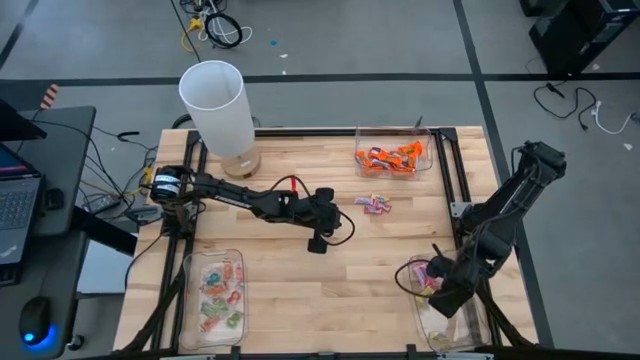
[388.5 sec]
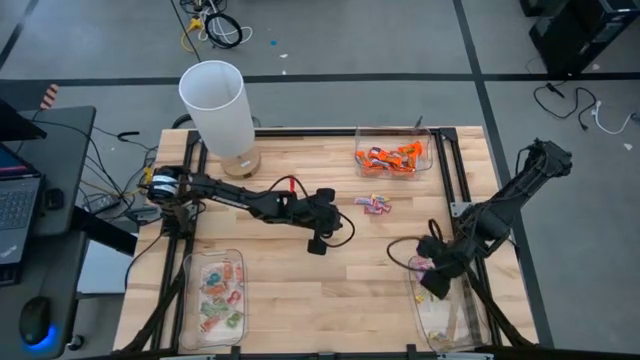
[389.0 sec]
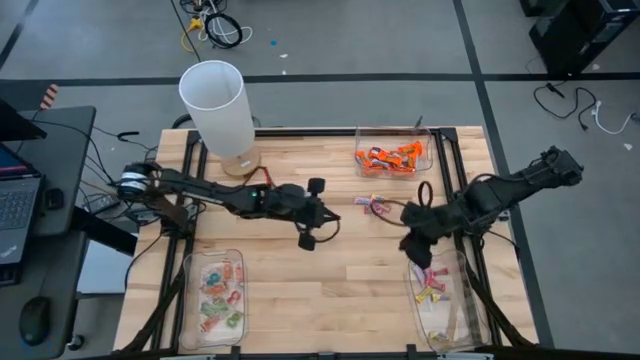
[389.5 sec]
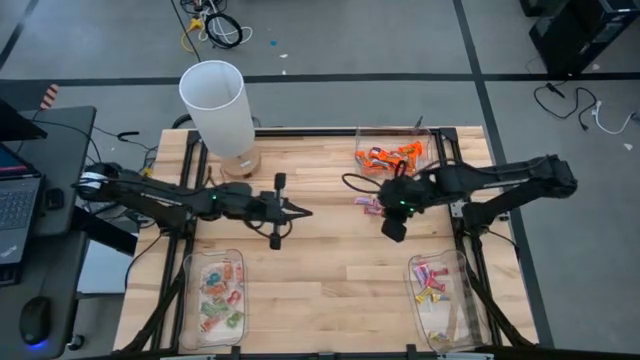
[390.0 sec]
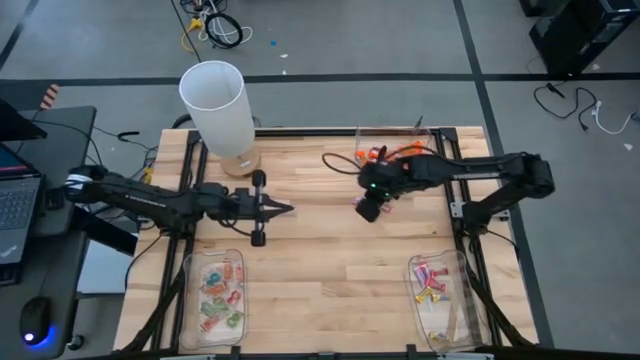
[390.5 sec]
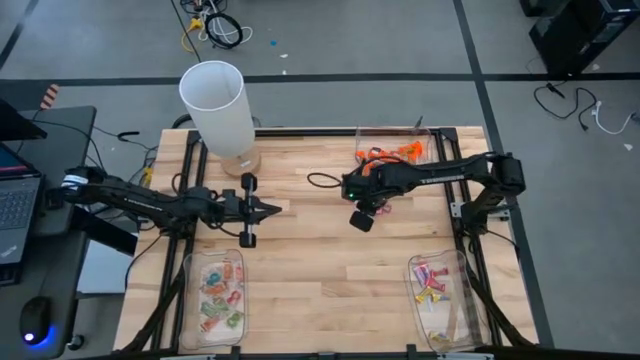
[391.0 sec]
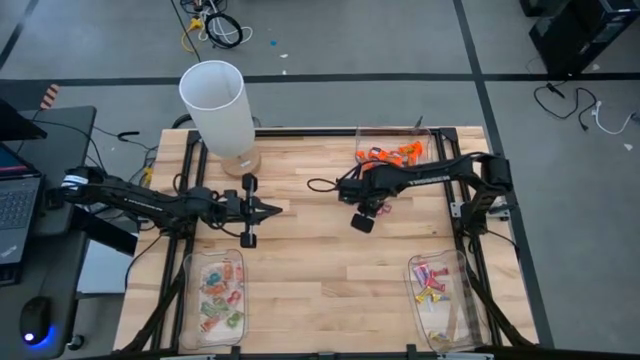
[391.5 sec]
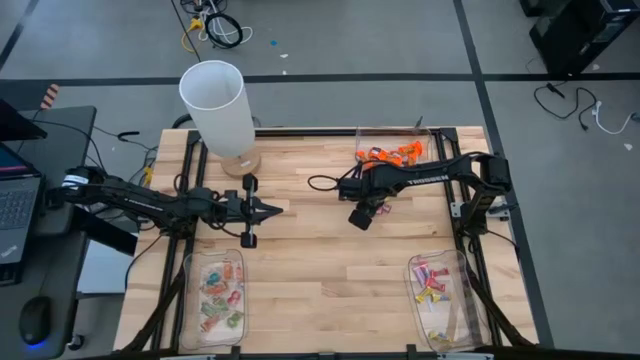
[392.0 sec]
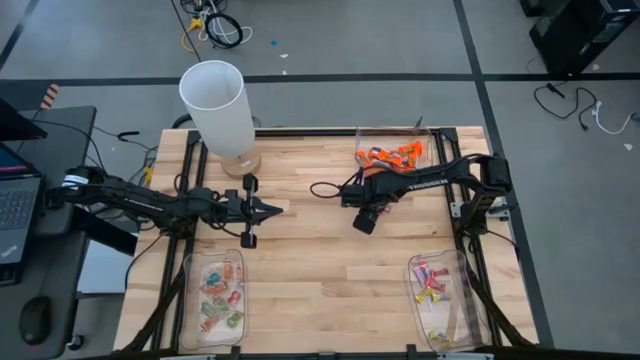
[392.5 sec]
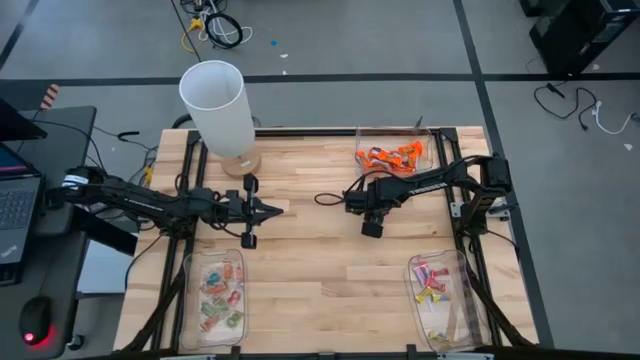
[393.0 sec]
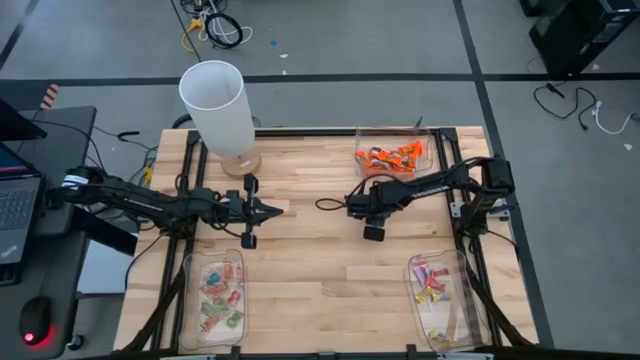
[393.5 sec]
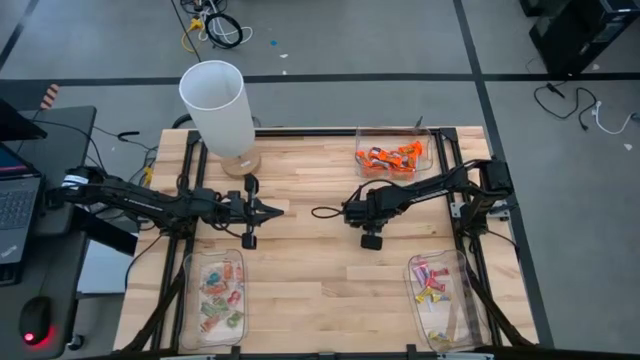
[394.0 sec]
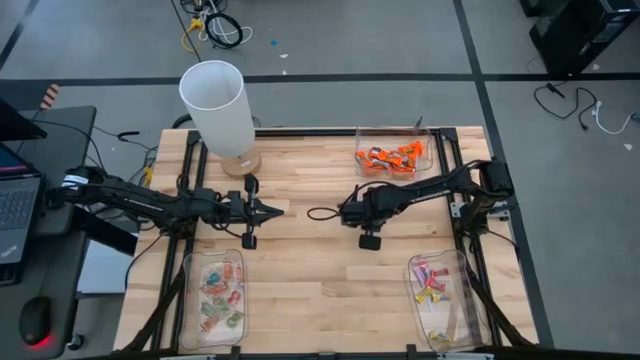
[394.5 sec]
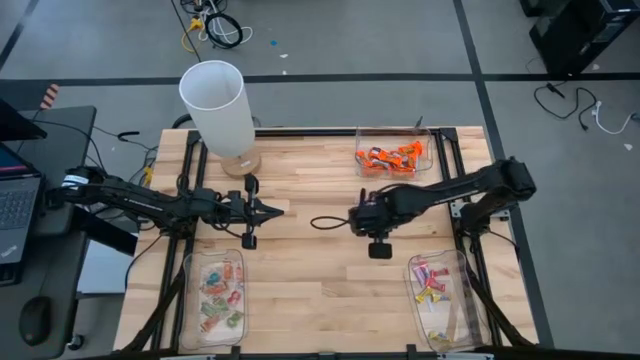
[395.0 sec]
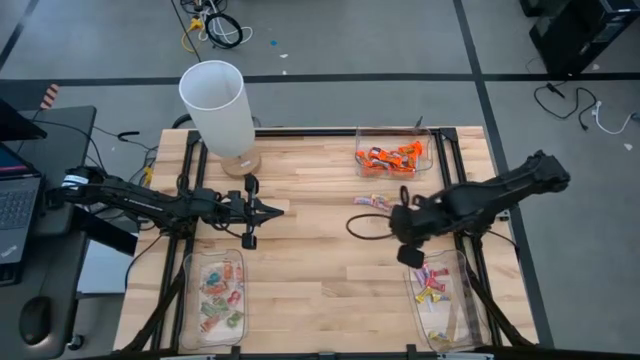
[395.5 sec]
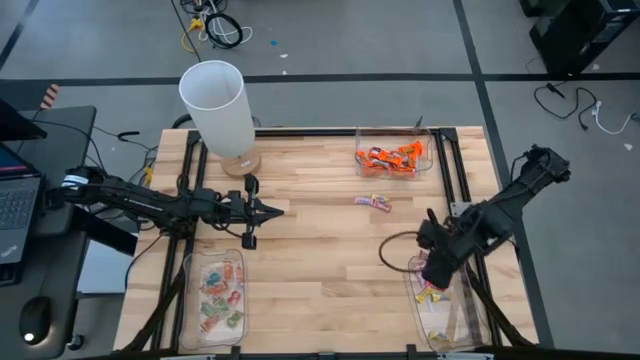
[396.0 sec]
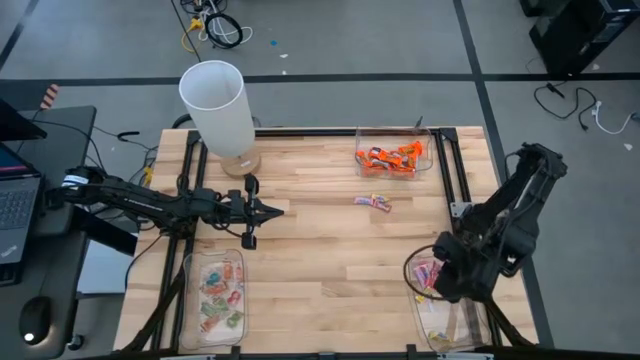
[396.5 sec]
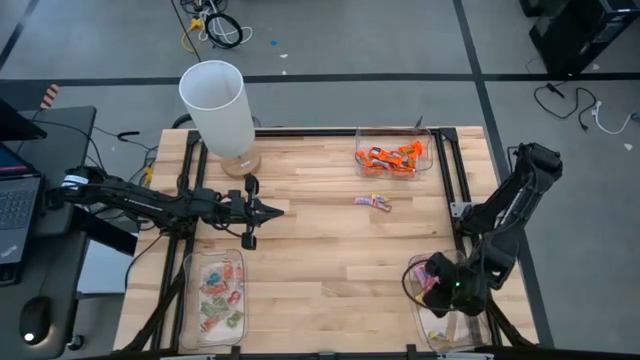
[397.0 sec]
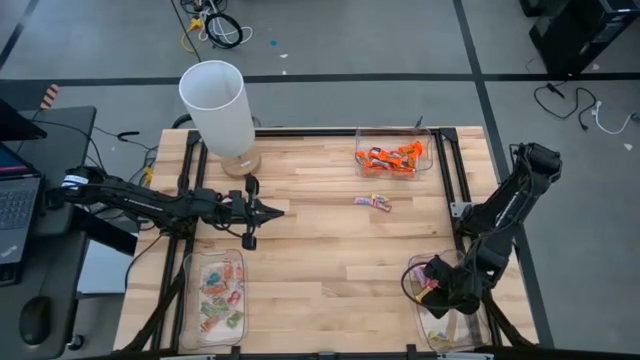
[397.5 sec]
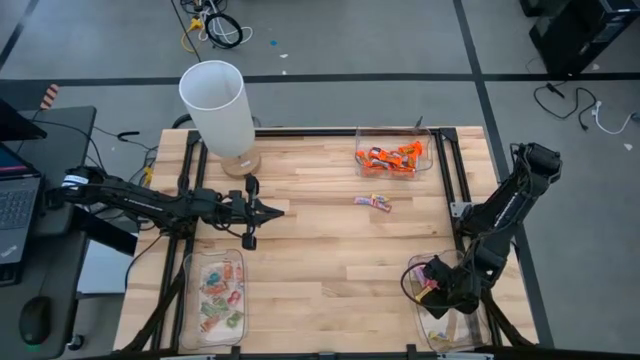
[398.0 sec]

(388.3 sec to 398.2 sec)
Task: Sort candy
Put the red candy into the bottom right transparent bin

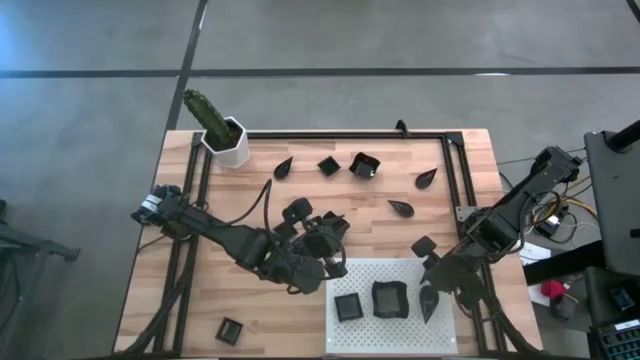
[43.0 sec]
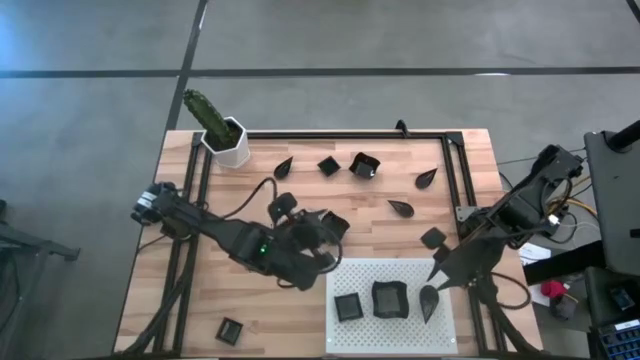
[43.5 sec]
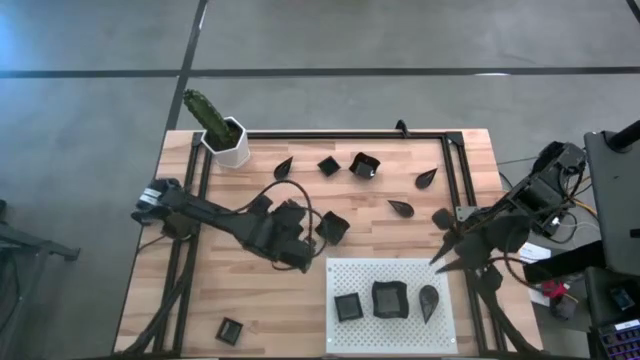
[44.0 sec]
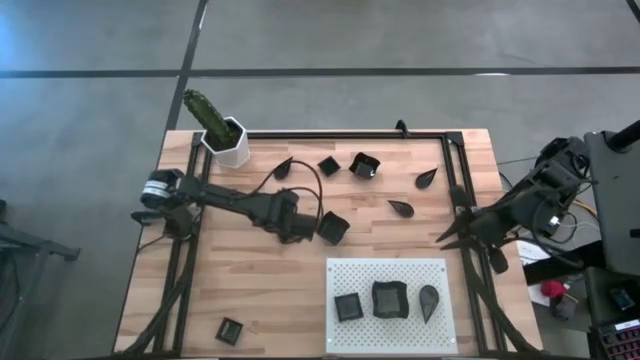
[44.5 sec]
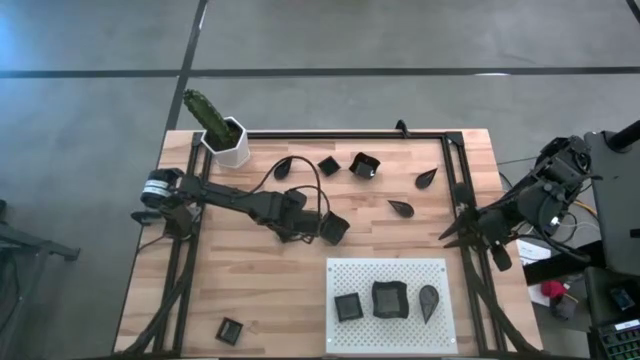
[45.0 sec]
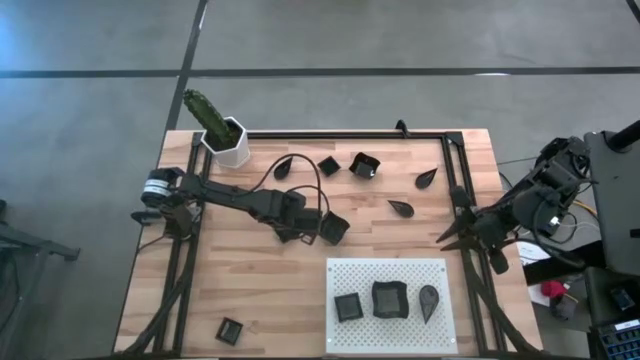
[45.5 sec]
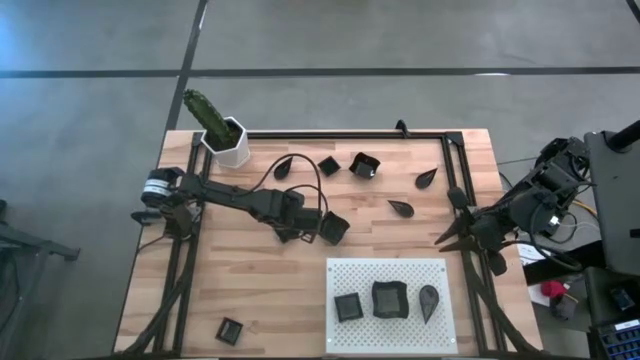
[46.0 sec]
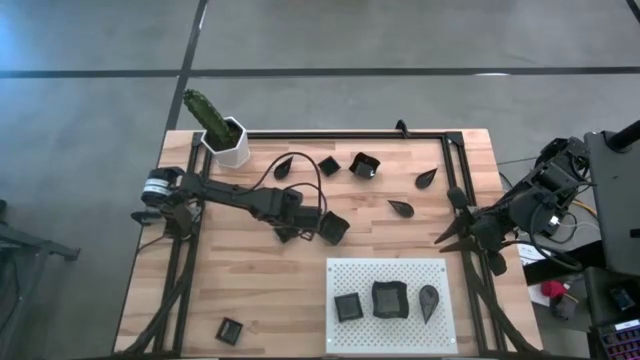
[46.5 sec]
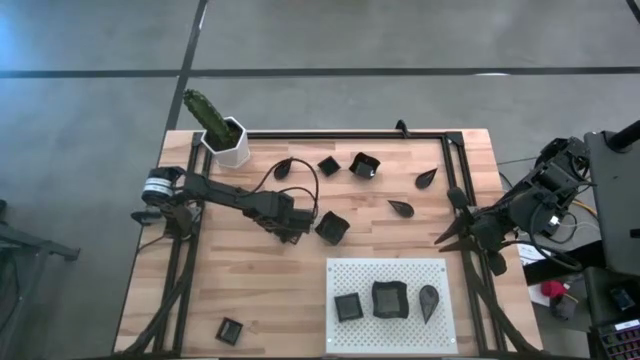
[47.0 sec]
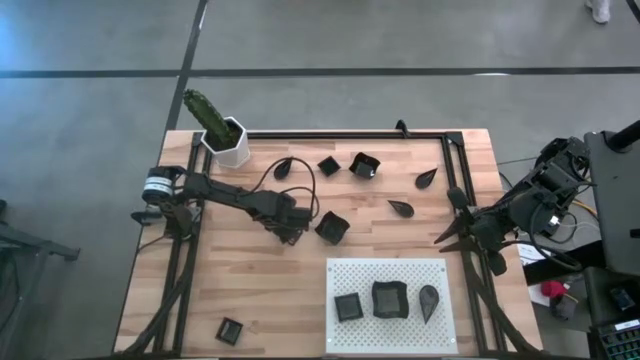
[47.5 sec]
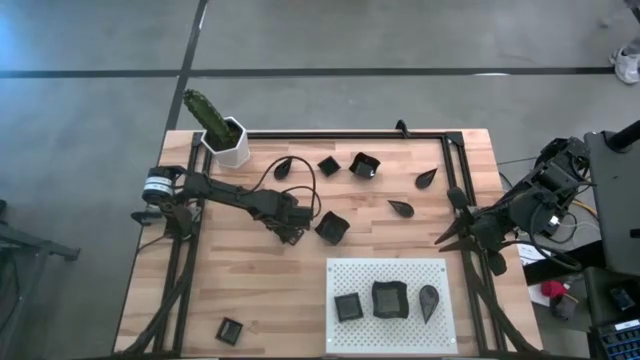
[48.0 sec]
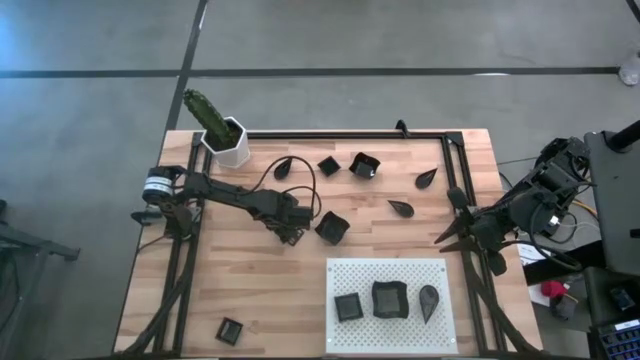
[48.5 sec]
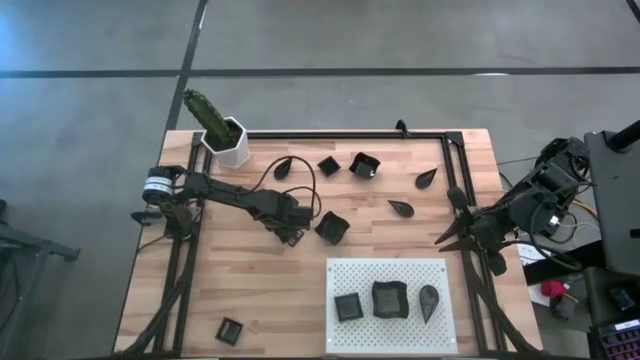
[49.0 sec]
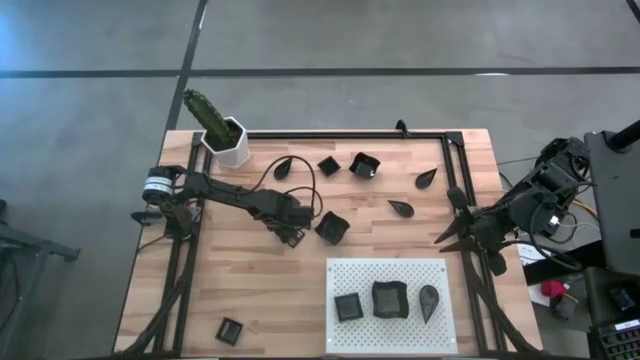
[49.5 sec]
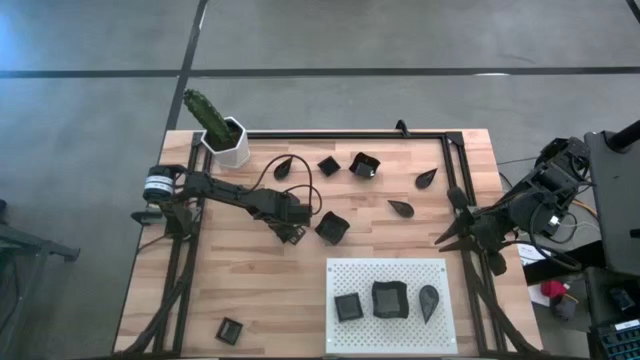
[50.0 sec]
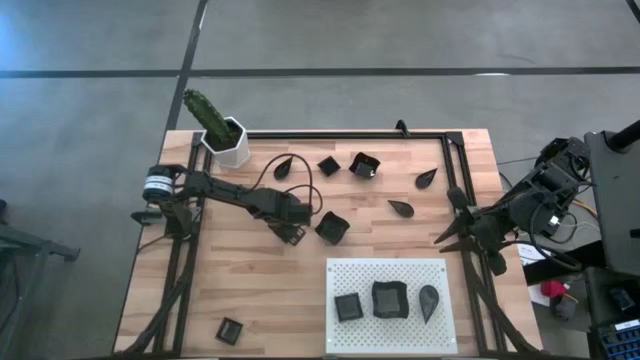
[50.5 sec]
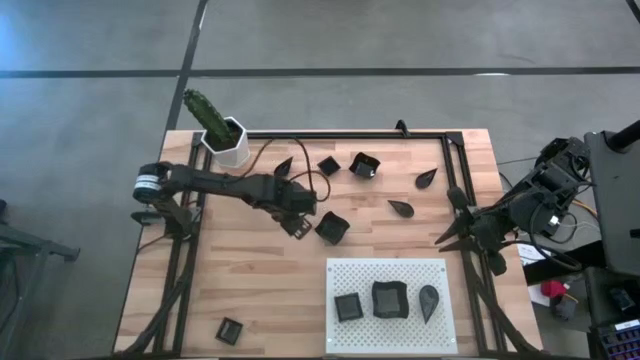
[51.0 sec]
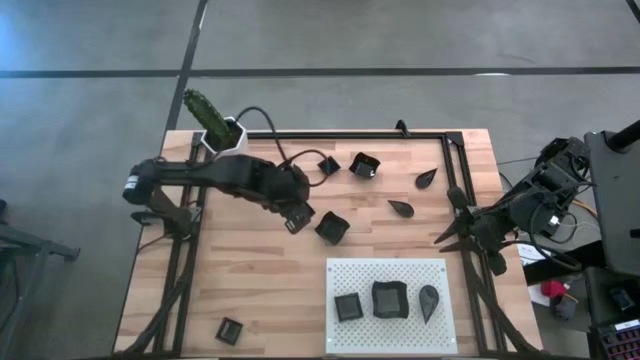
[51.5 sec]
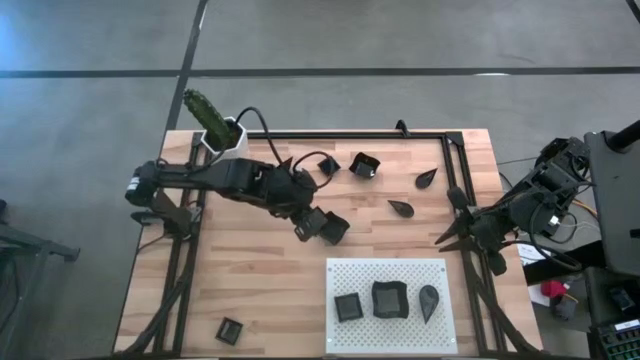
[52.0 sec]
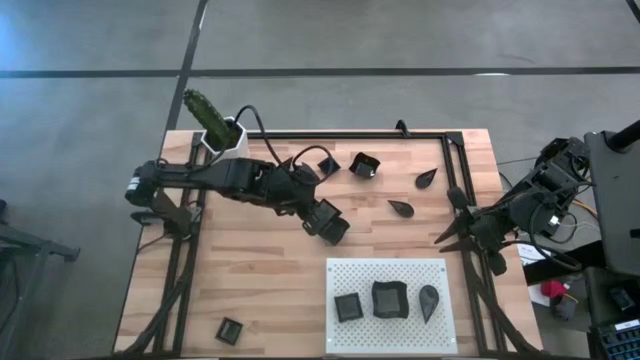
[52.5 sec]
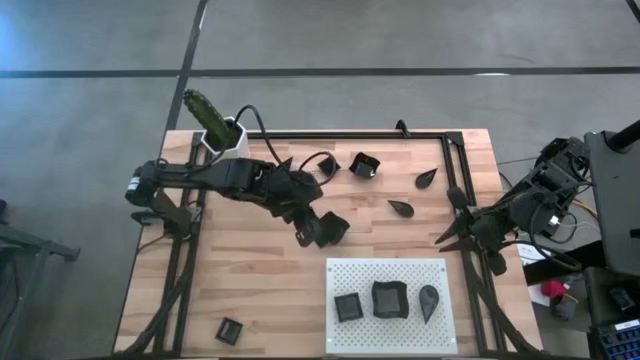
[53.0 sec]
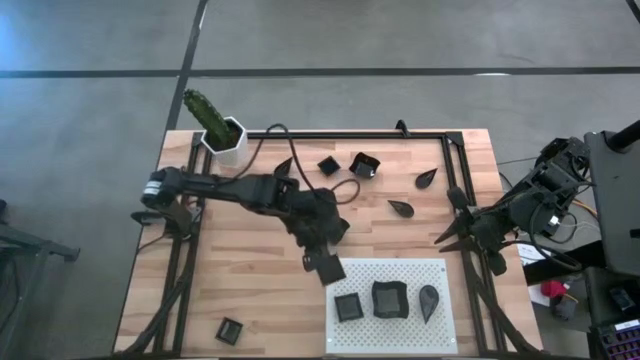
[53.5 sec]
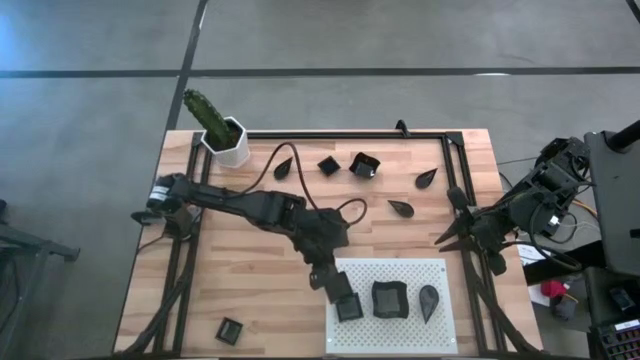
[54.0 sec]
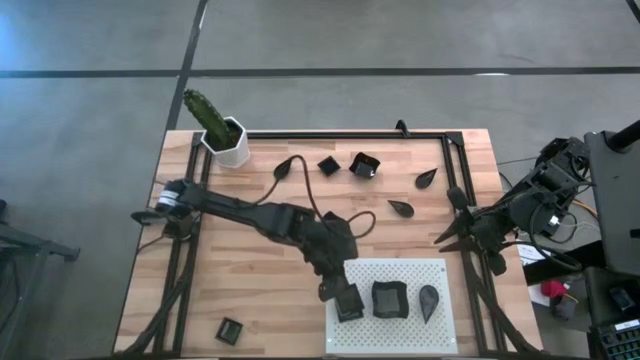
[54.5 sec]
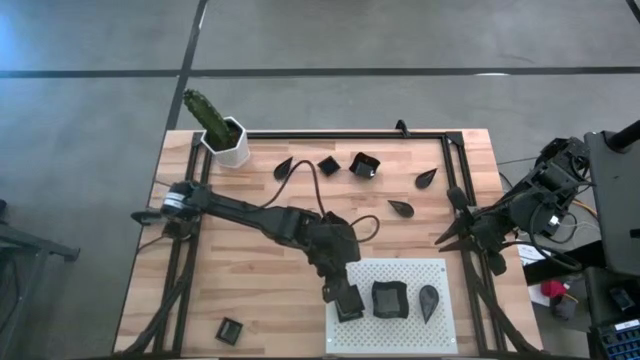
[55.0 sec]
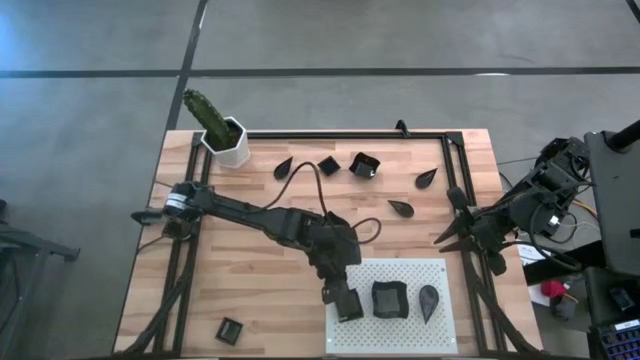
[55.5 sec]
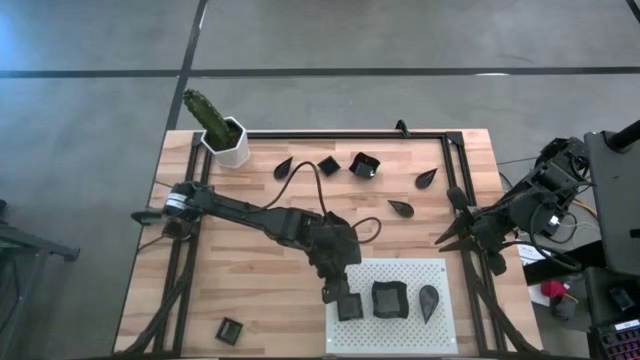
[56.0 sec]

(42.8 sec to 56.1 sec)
Task: Pick & Place Mini shaped plates
Stack the square plate on top of the square plate on the shelf
